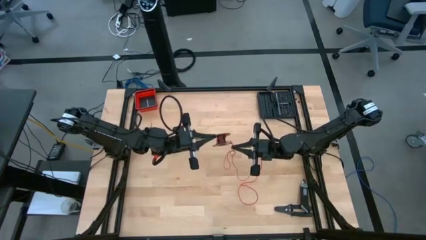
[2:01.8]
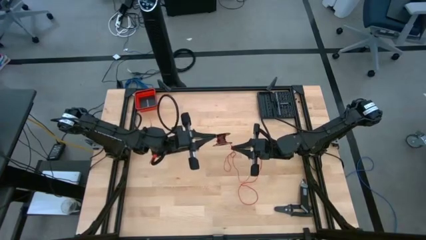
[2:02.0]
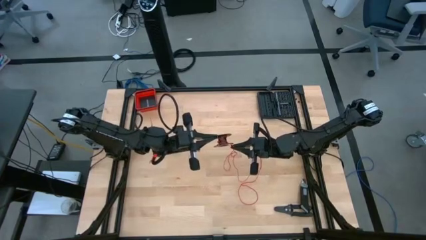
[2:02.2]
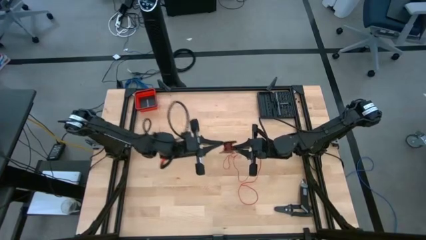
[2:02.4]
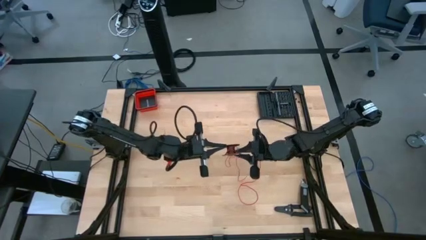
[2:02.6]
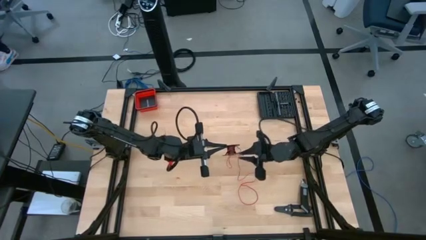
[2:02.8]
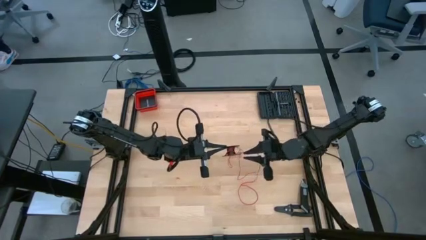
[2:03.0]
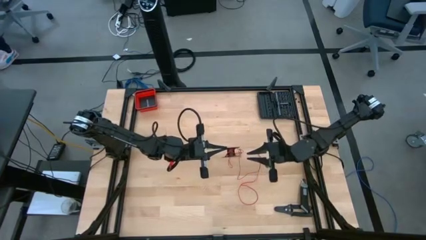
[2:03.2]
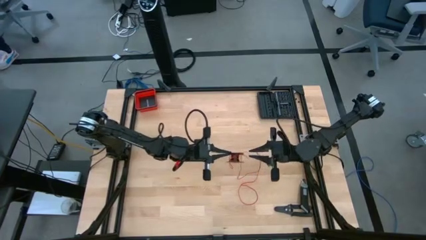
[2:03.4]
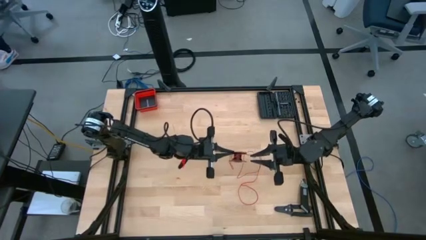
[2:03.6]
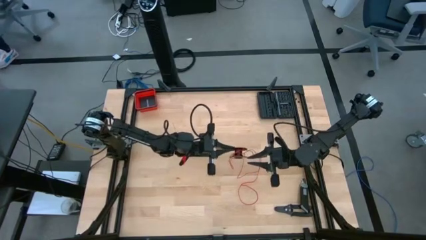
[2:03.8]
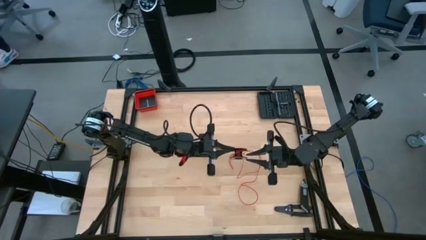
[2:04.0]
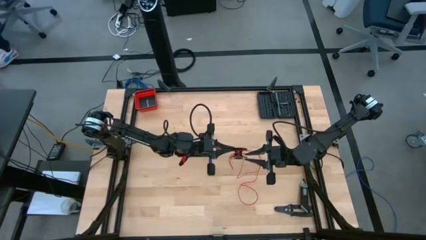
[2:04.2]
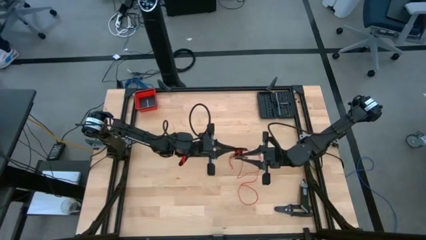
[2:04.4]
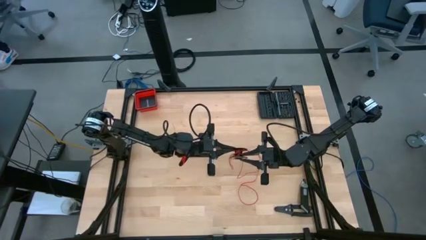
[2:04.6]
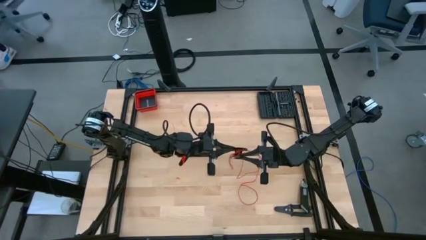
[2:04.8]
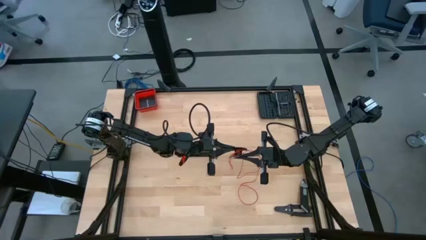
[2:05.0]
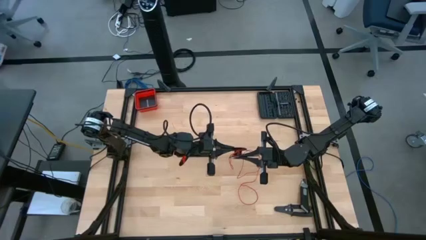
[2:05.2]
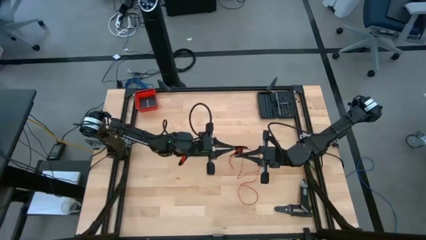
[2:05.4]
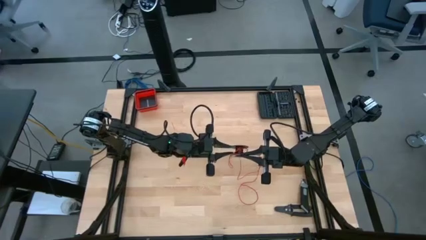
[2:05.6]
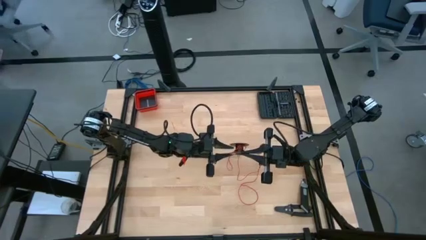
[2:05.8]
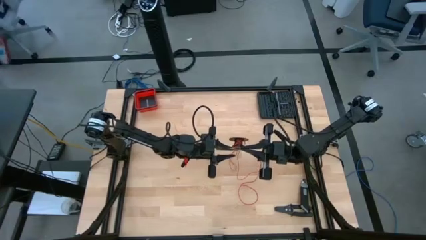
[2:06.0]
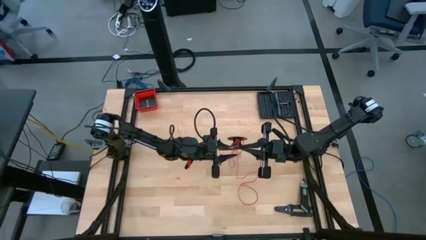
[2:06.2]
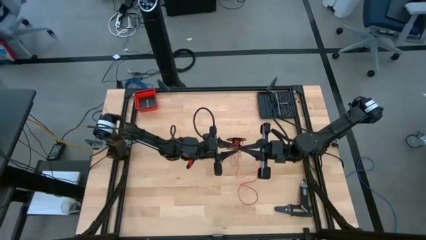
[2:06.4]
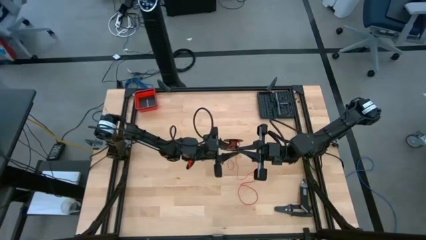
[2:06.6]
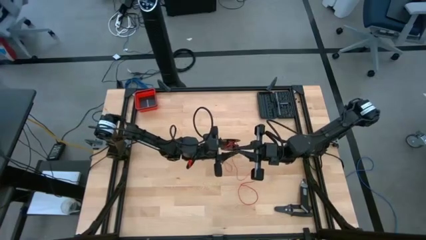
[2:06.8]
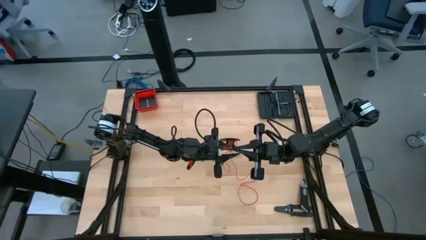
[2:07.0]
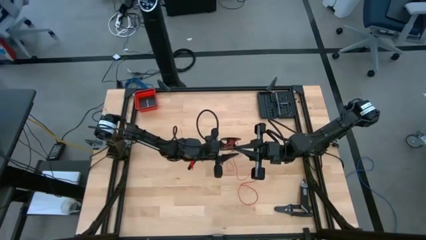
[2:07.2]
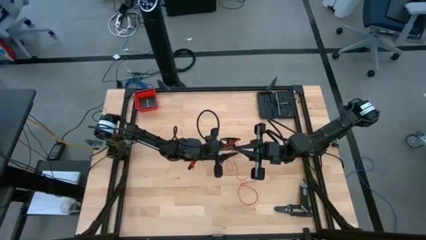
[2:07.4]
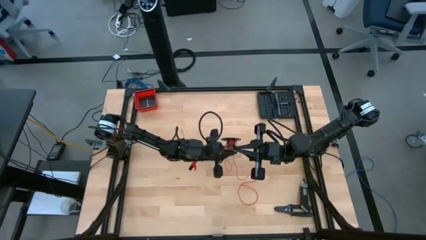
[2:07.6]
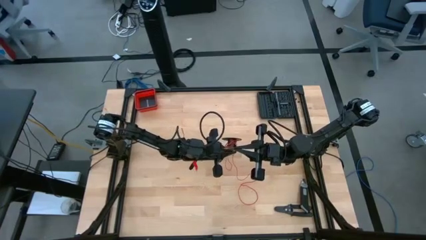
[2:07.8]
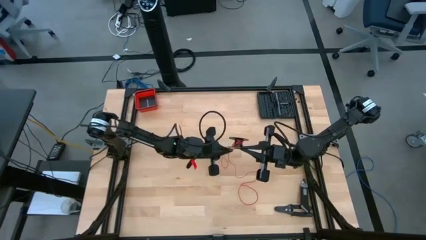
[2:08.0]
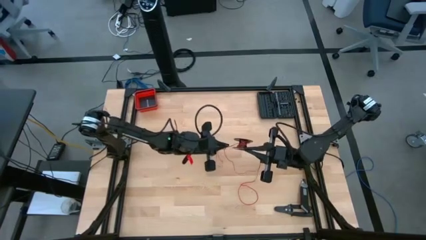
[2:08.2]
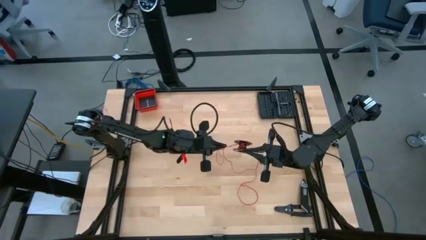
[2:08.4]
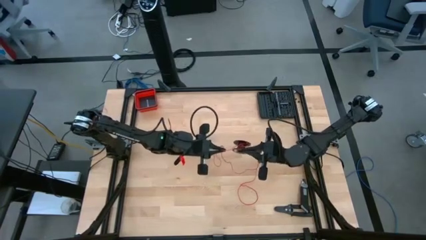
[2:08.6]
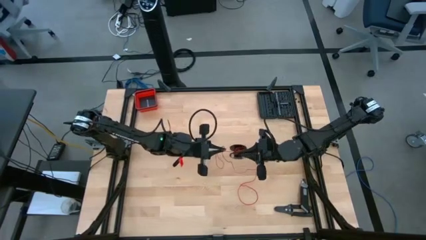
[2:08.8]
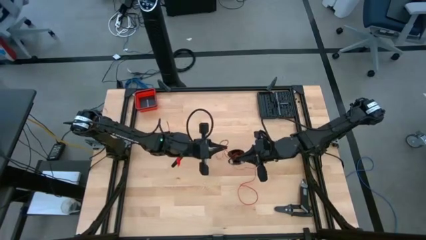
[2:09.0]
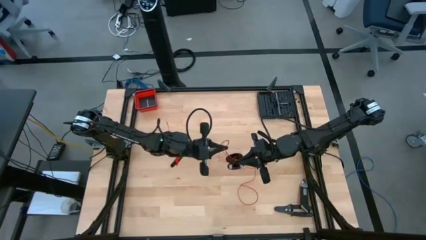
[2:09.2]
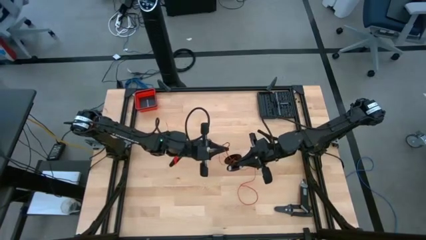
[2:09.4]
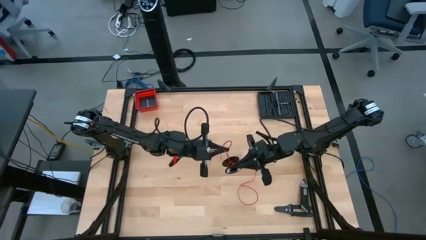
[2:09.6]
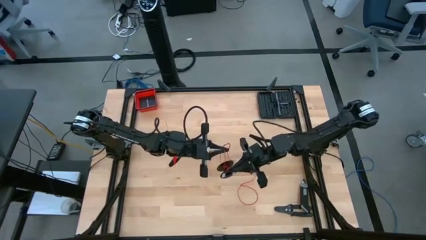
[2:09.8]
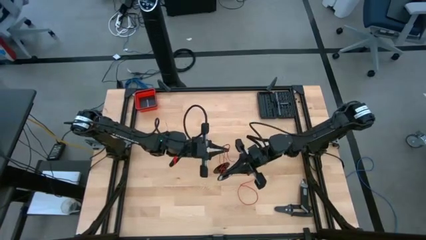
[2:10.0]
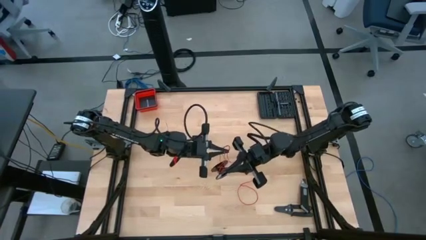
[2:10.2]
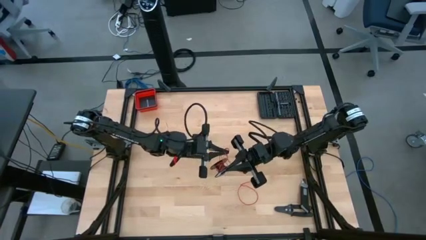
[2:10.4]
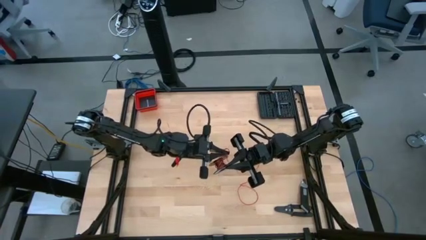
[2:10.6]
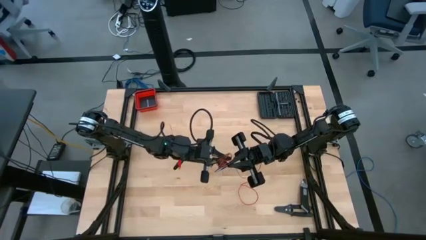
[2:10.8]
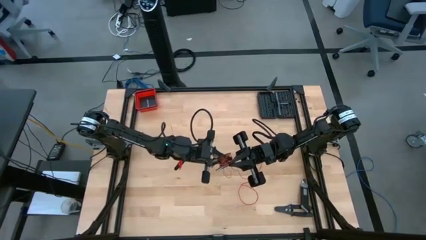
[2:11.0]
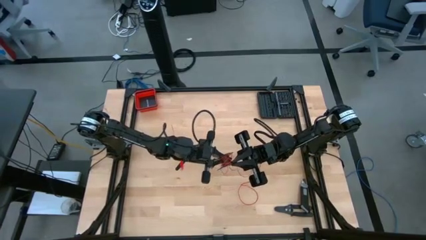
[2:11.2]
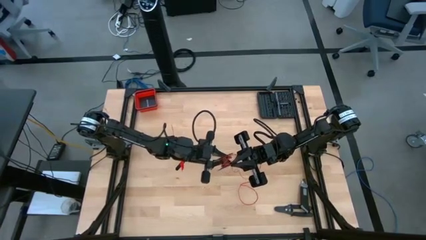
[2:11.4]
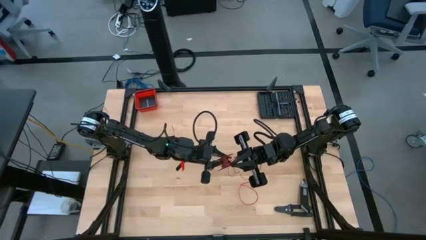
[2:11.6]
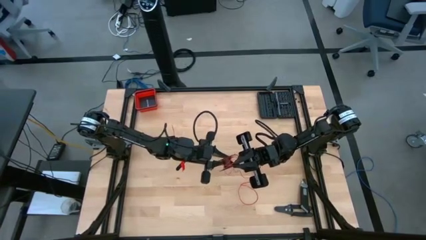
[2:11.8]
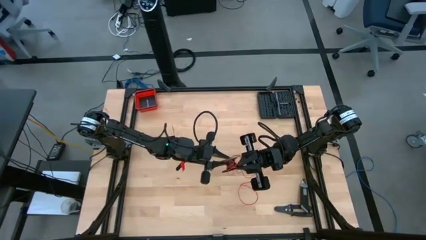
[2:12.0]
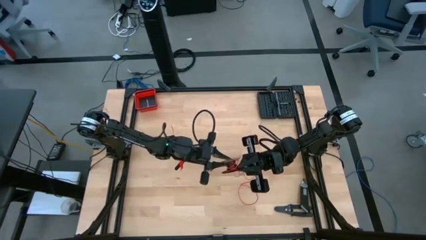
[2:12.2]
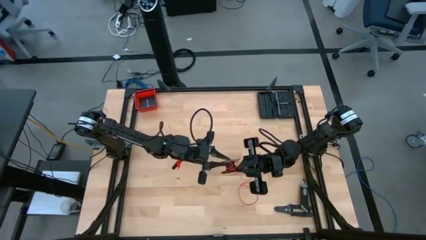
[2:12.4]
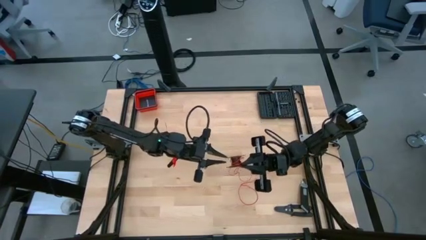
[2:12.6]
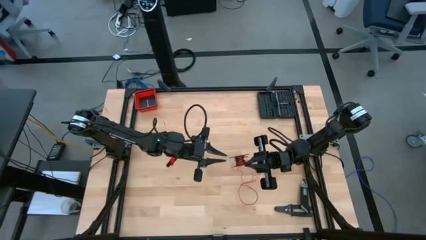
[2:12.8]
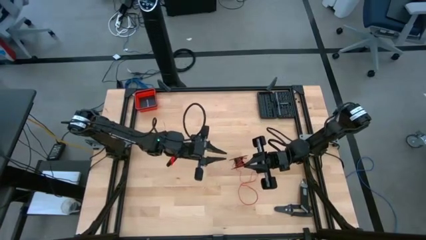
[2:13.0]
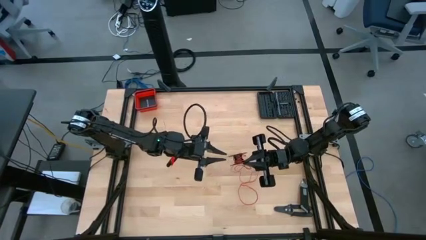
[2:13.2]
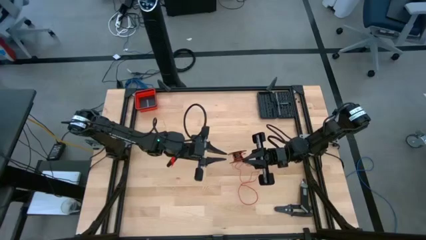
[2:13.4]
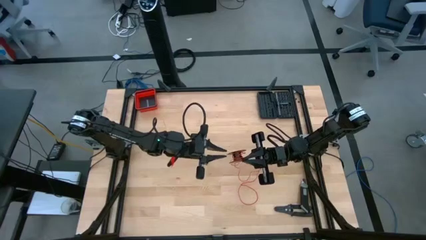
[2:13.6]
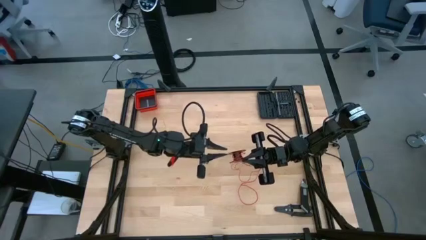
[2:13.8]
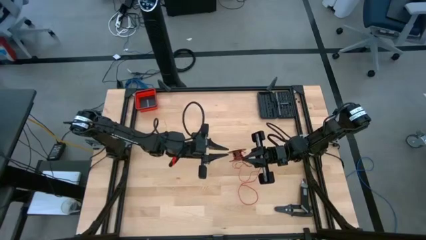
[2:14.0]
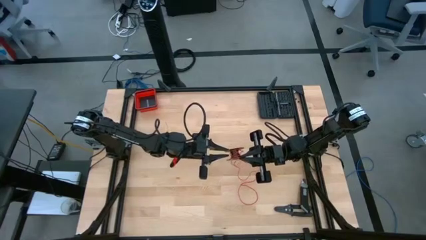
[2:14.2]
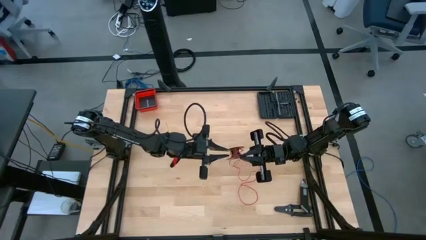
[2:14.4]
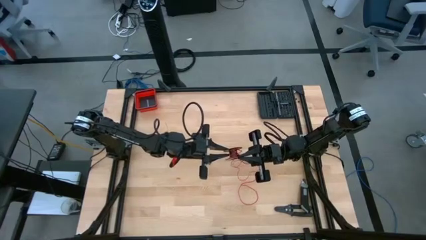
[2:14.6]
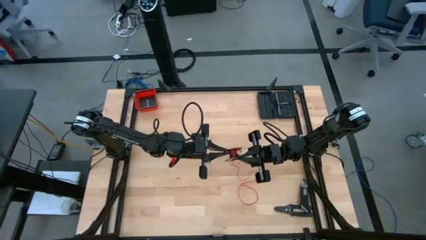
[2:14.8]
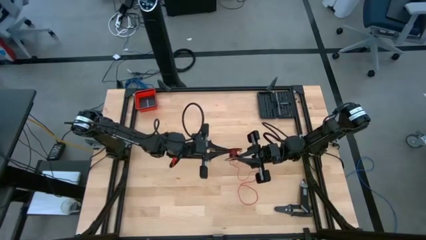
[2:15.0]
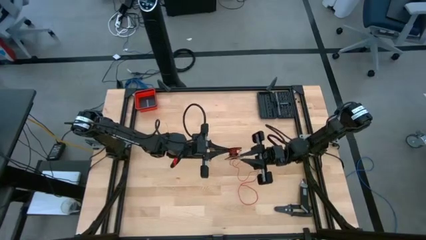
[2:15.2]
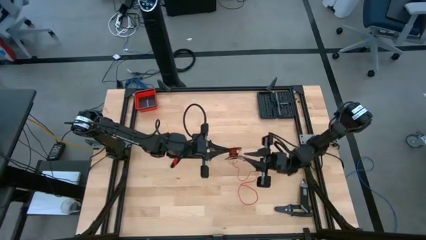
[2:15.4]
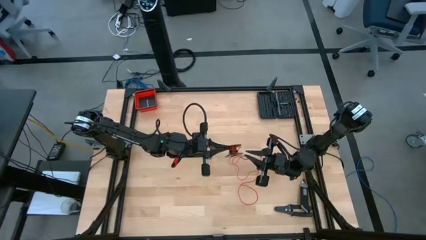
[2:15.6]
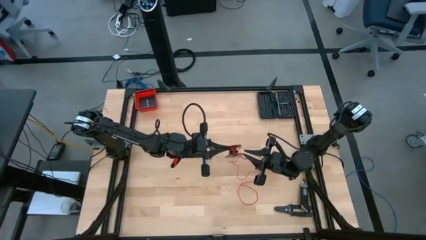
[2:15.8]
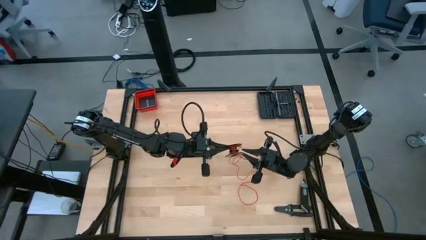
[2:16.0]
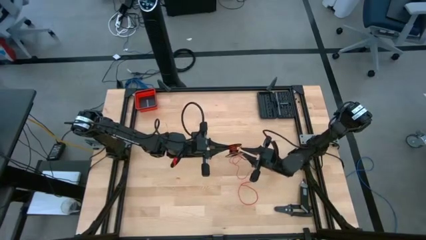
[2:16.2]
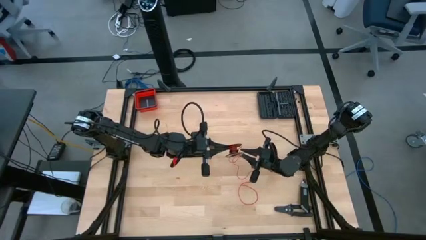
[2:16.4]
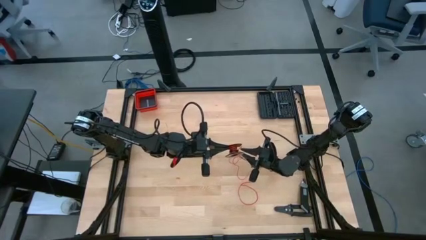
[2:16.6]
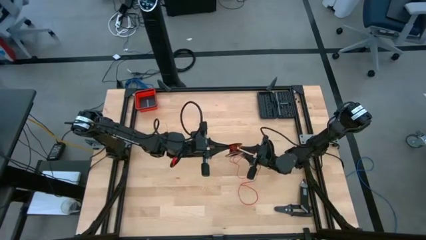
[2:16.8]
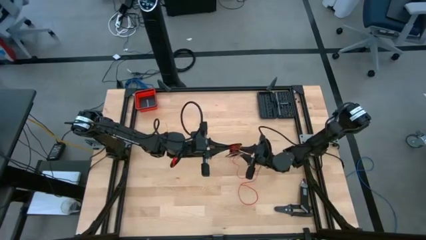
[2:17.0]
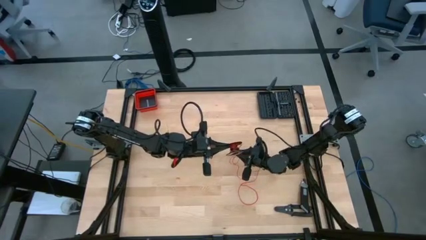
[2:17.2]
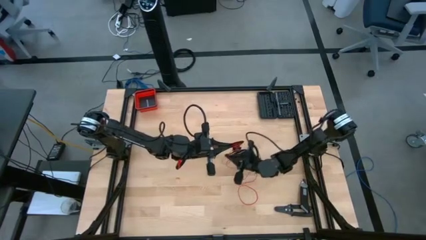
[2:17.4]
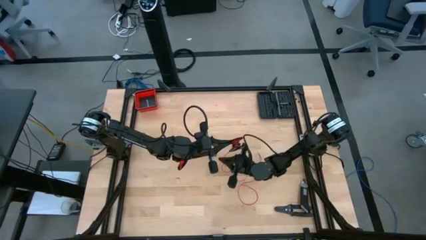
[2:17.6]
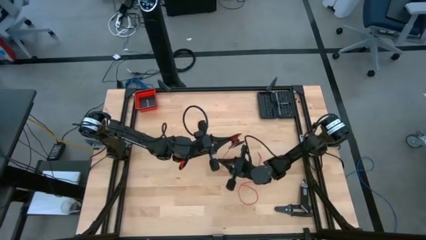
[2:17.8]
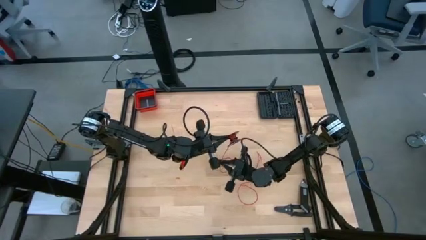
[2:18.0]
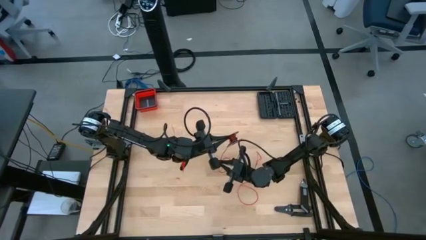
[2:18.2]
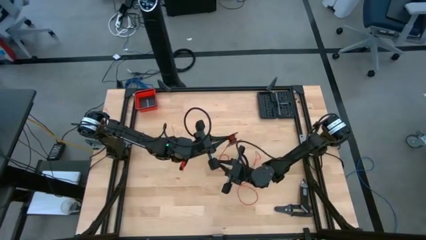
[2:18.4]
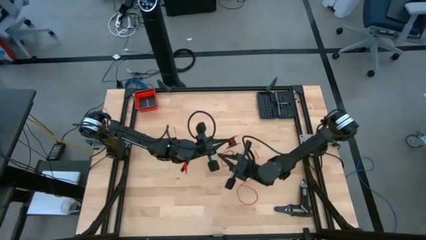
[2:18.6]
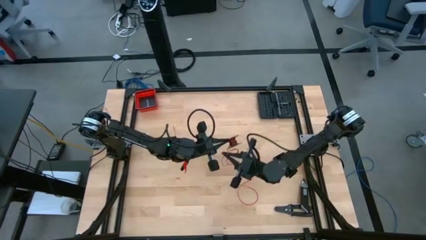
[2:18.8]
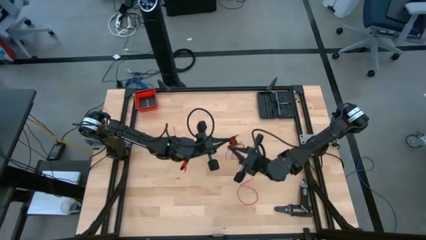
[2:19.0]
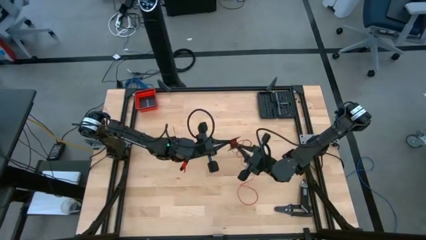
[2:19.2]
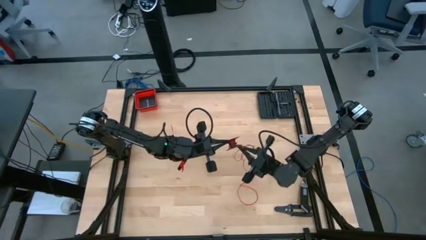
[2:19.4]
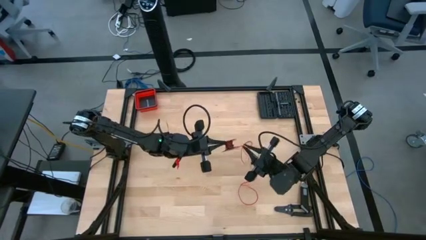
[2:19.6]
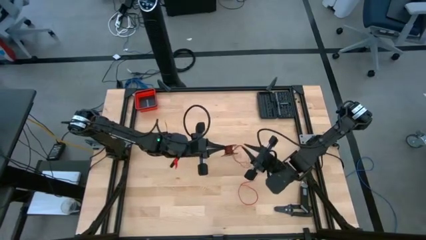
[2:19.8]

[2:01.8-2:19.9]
Task: Coil cords
Coil the red wire onto the spool
